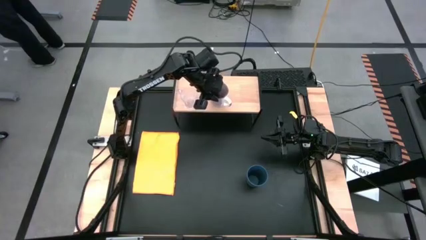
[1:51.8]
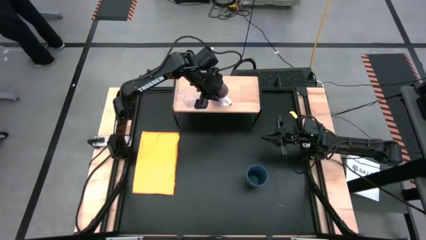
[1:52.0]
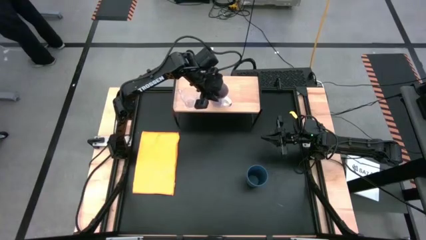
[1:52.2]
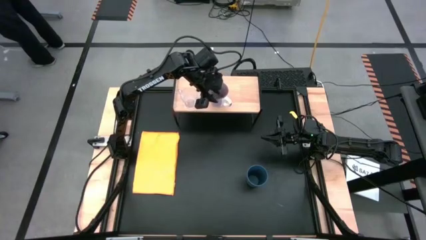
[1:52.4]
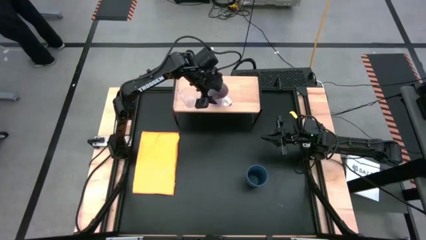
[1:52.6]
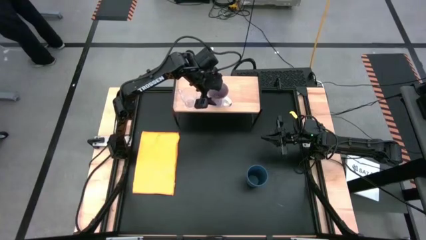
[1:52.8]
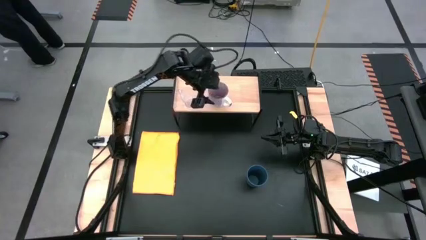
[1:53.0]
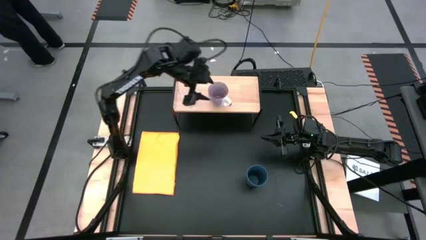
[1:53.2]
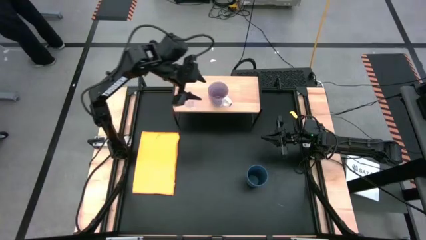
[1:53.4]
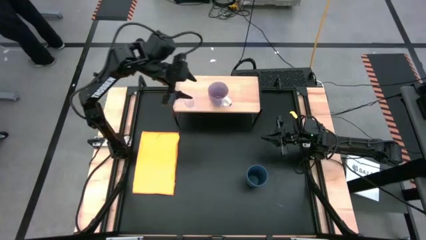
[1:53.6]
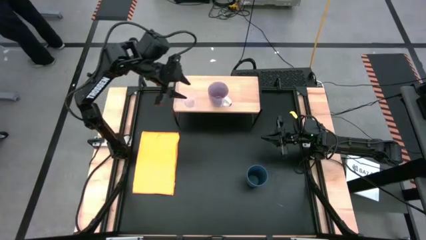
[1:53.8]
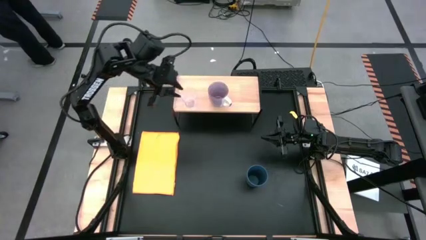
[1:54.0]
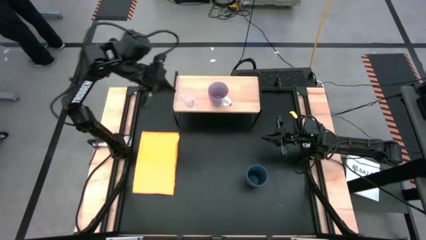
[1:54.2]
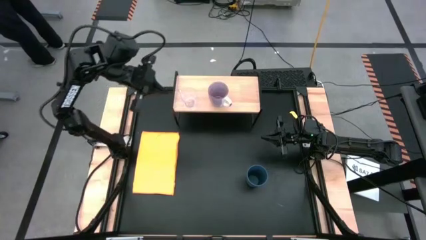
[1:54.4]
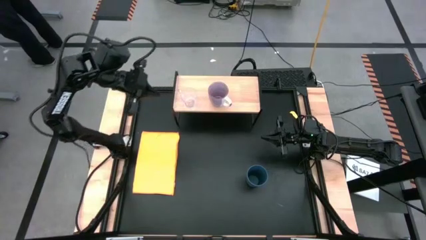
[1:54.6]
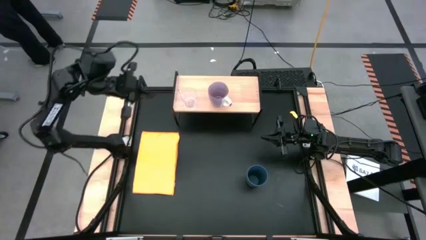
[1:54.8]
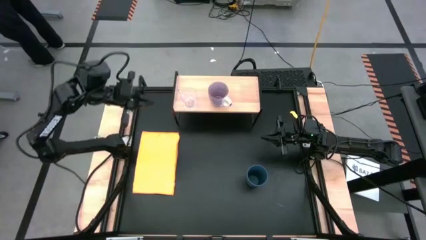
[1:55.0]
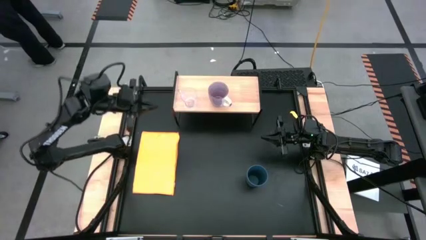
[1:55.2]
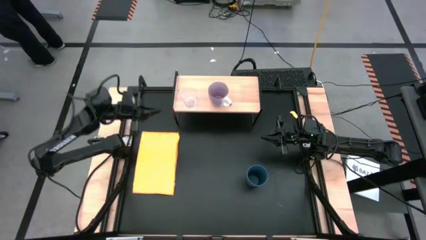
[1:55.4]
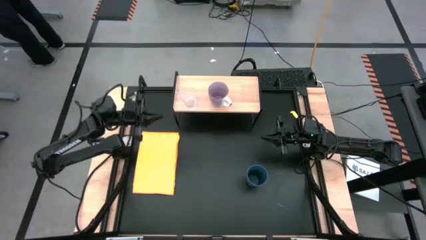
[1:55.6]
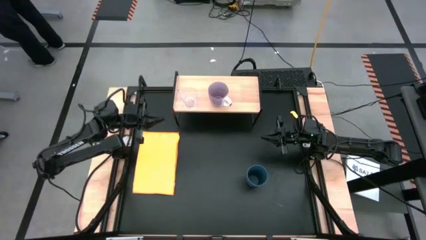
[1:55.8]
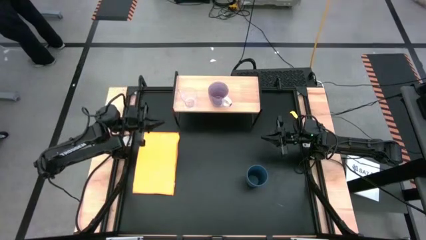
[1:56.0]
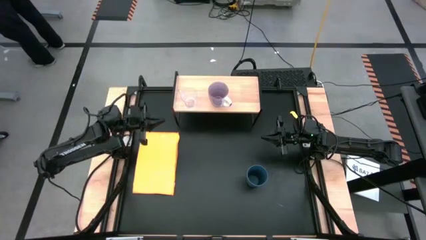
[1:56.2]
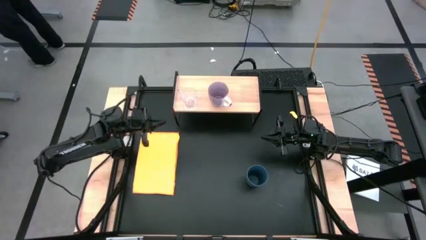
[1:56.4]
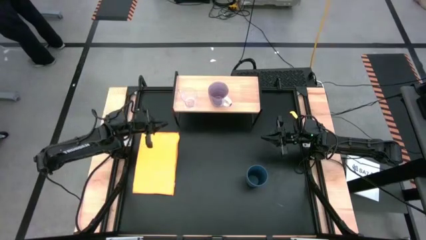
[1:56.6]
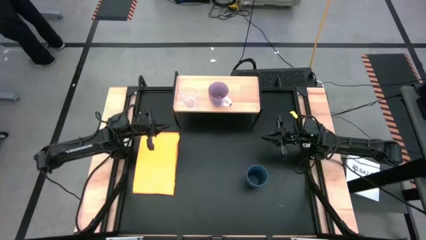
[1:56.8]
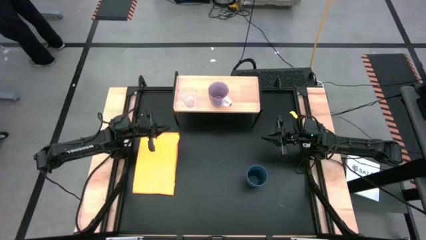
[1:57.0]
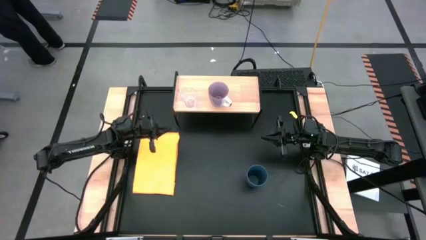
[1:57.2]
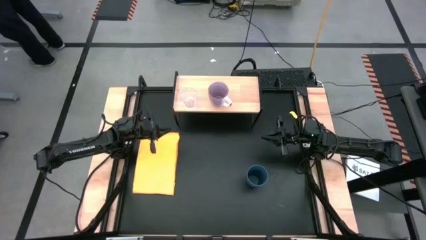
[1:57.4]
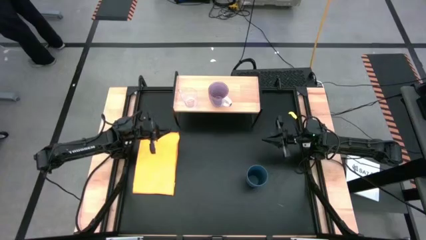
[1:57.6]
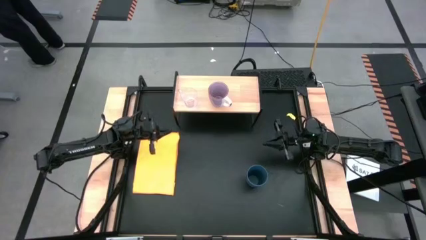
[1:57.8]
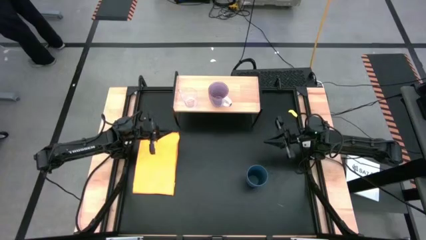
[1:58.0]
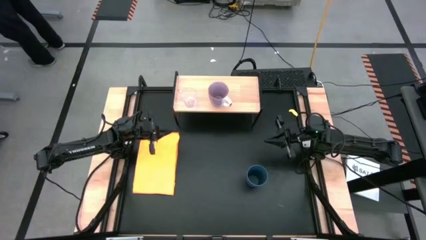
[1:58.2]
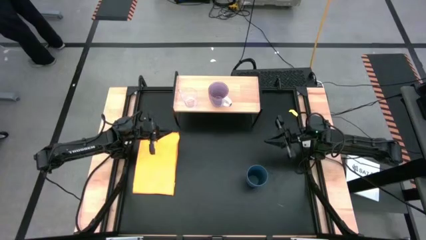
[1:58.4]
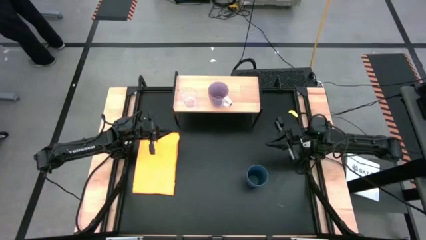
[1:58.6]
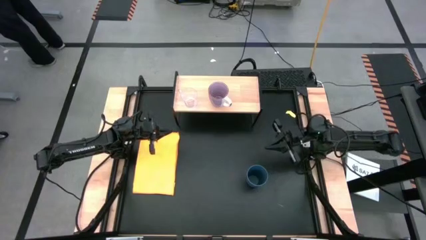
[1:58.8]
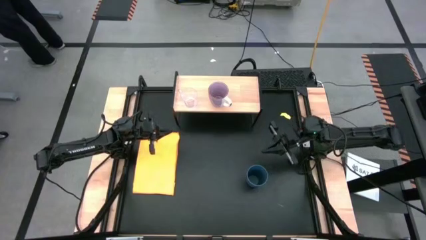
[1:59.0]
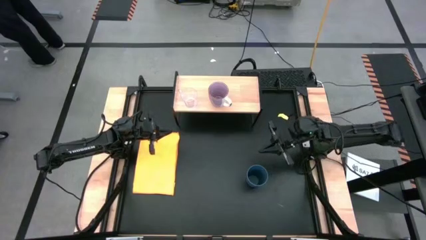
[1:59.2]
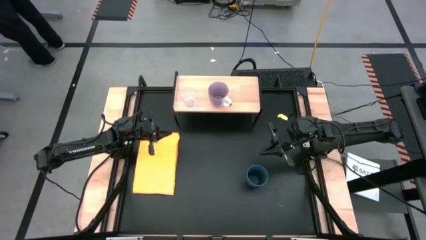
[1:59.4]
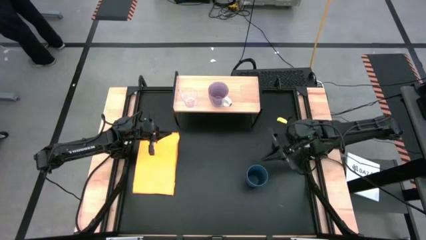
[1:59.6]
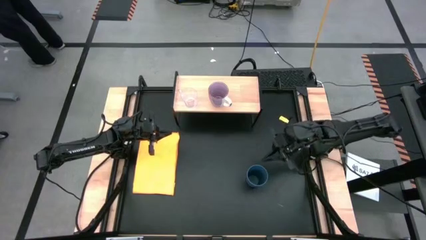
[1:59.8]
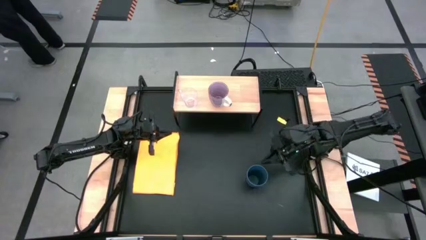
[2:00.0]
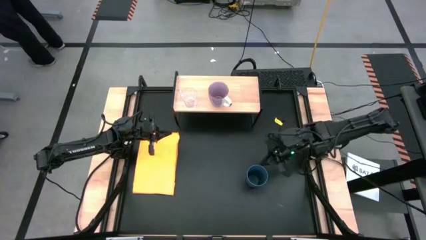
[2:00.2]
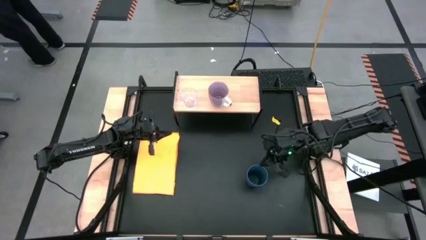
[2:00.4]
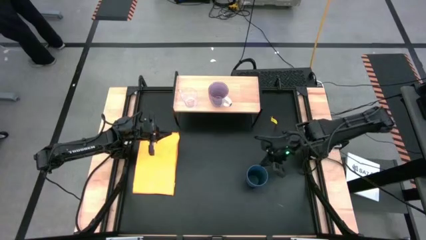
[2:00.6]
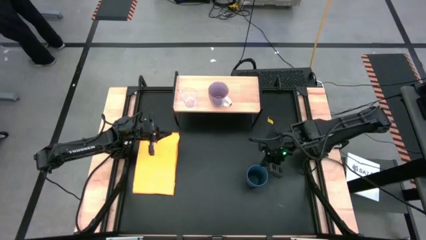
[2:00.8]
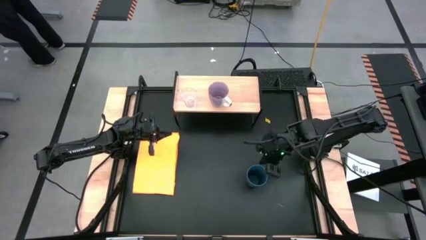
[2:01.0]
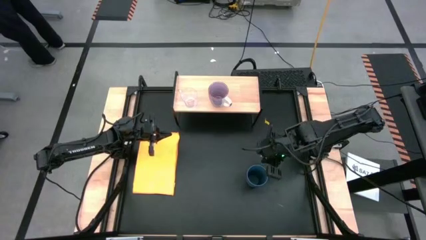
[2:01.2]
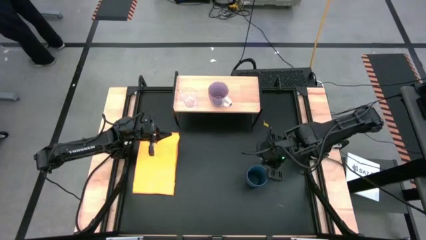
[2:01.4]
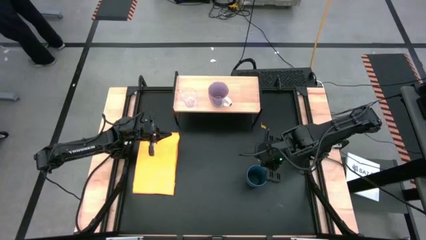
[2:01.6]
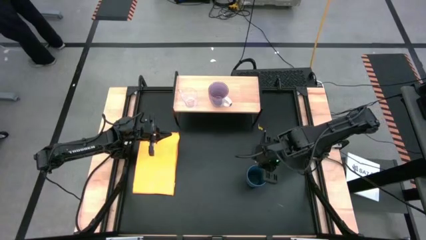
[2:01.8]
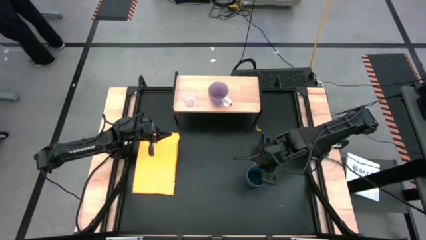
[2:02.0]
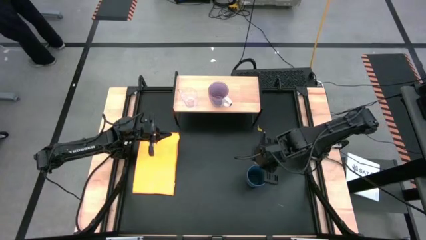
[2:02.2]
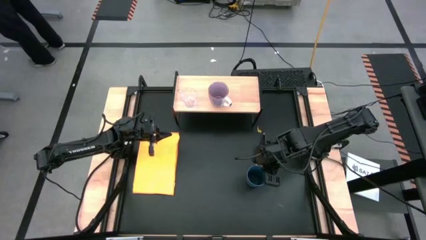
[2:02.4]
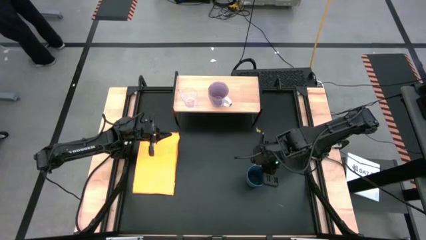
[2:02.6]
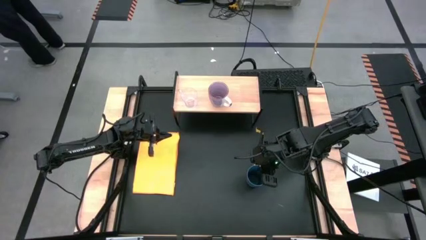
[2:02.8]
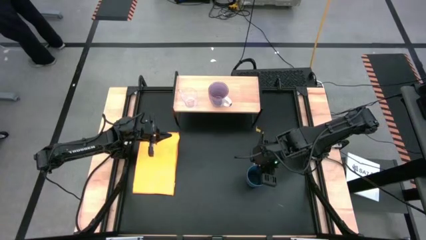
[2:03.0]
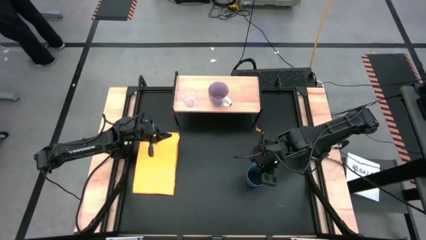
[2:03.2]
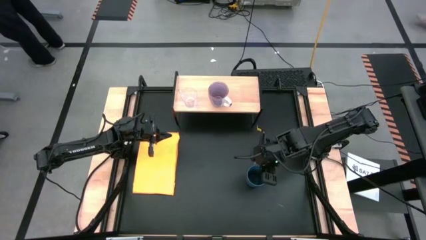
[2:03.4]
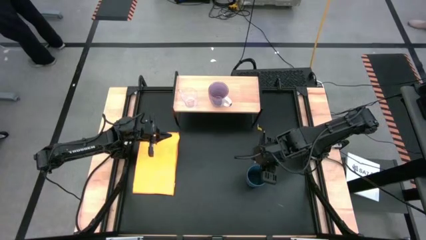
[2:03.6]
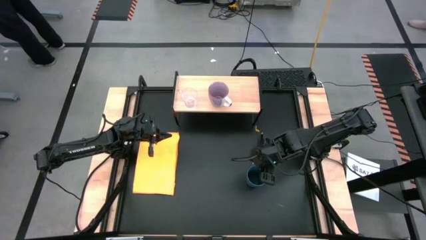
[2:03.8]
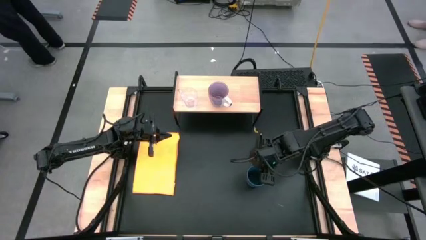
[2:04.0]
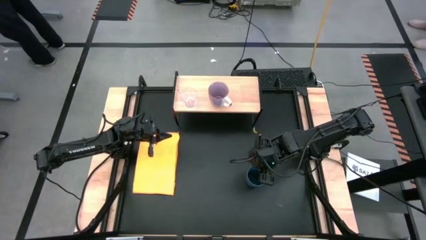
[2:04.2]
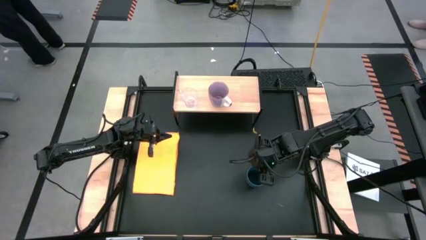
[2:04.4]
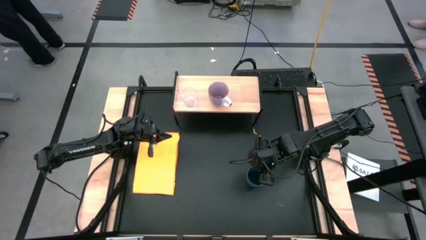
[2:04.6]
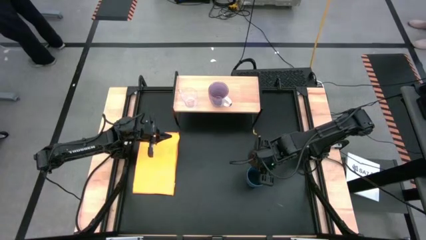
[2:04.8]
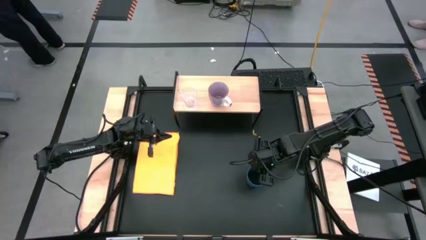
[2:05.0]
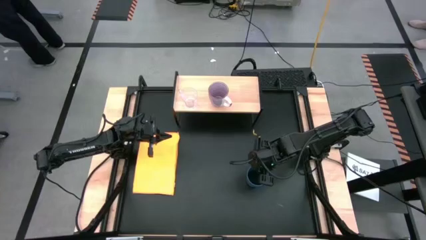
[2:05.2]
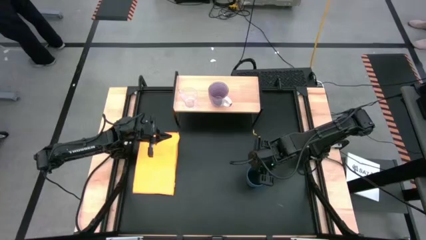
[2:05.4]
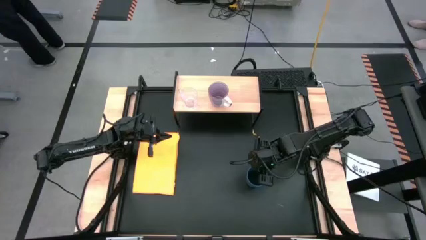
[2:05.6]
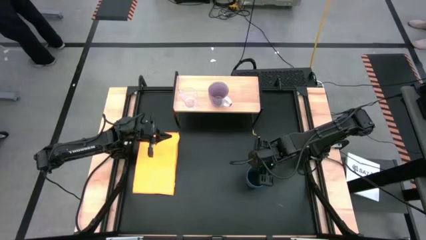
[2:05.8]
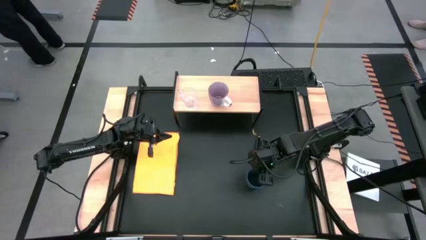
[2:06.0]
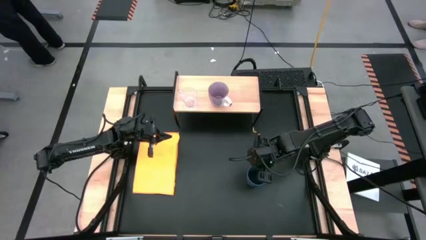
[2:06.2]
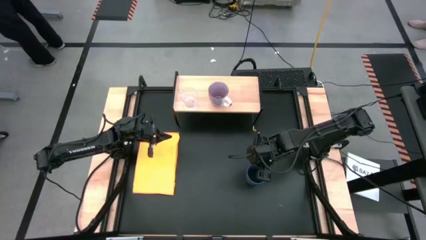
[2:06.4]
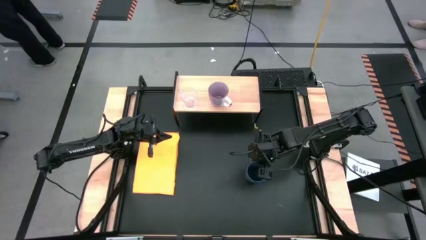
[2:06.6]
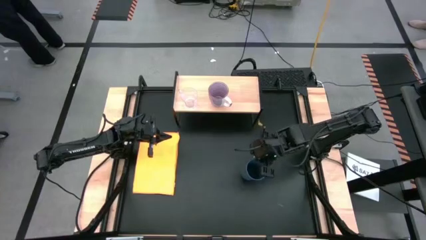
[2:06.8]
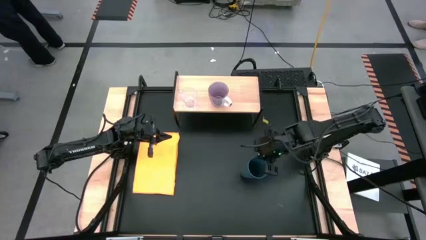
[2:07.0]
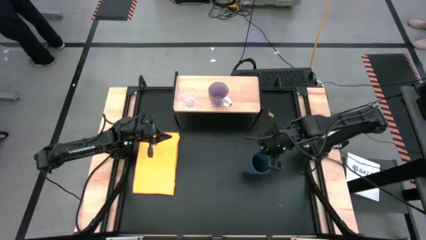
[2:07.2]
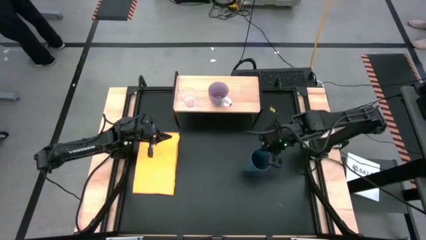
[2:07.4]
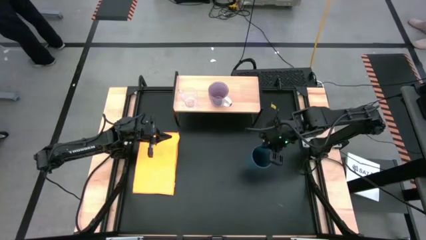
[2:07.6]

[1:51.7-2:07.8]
Task: Stack small to large cups/mugs on shelf
Put the blue cup on the shelf
